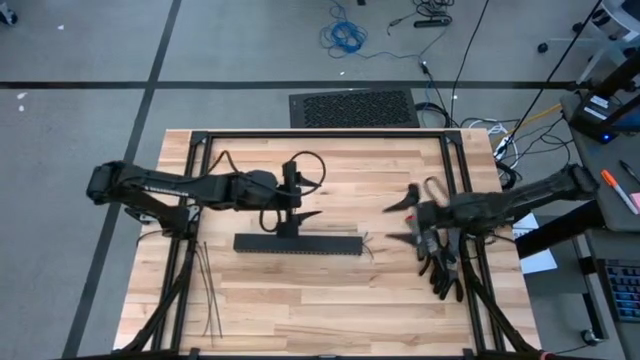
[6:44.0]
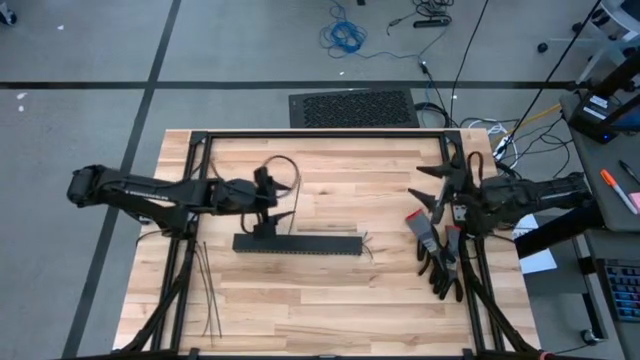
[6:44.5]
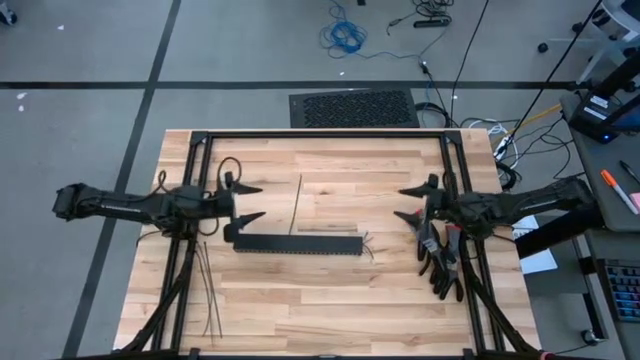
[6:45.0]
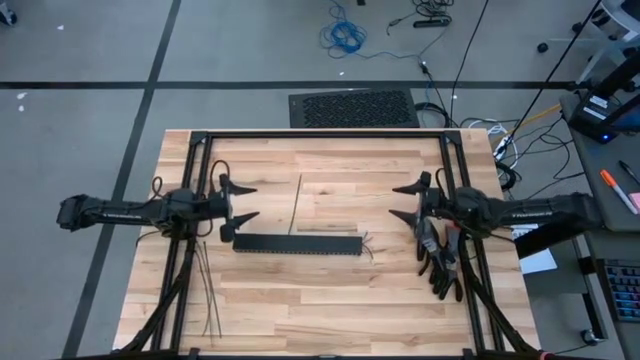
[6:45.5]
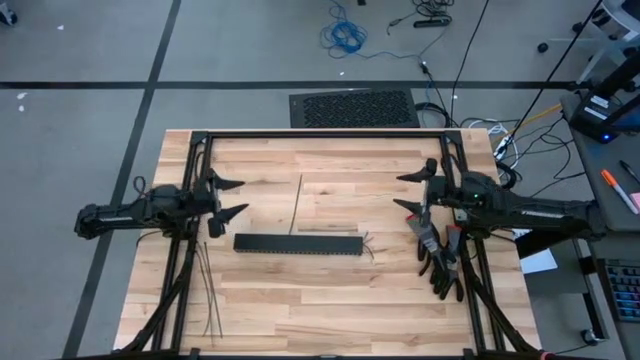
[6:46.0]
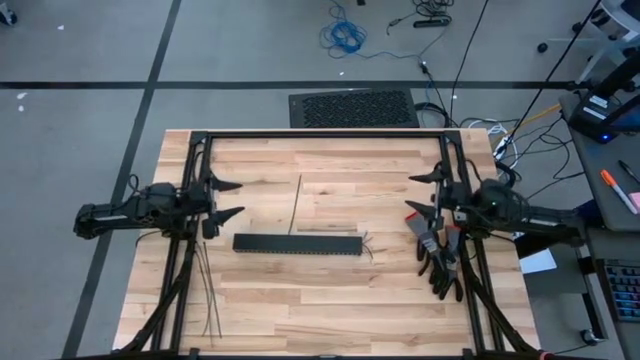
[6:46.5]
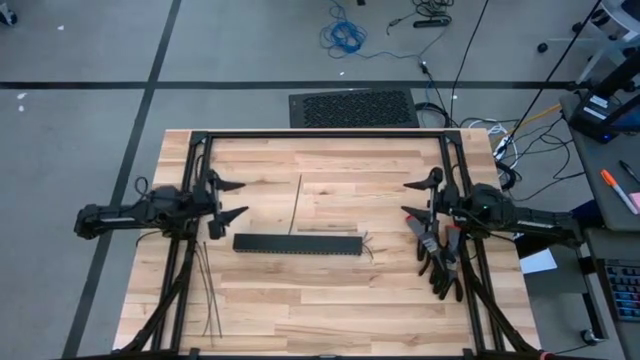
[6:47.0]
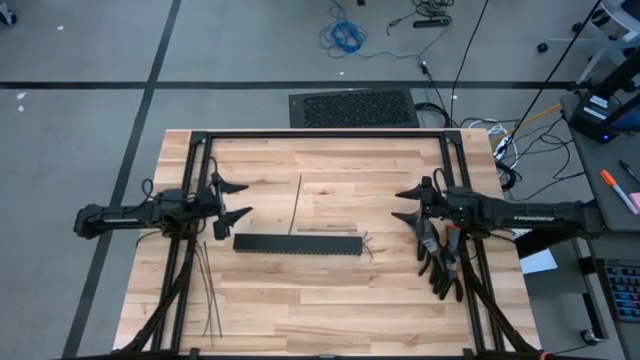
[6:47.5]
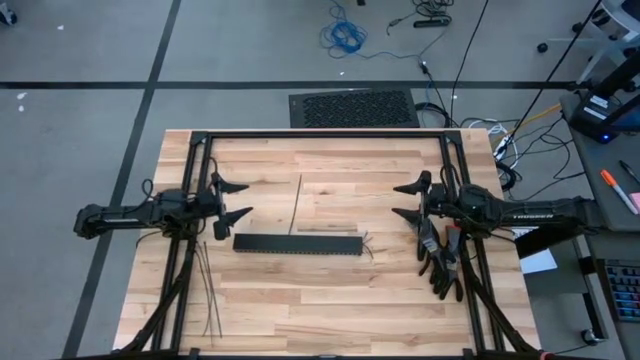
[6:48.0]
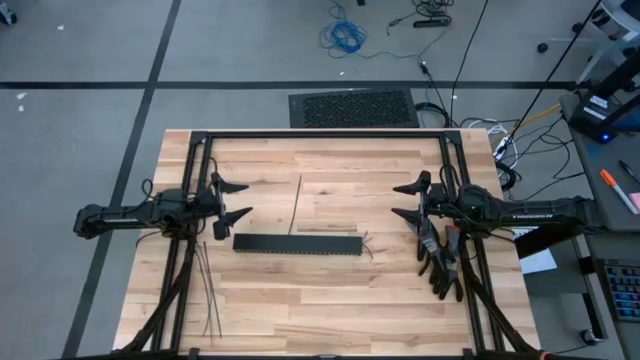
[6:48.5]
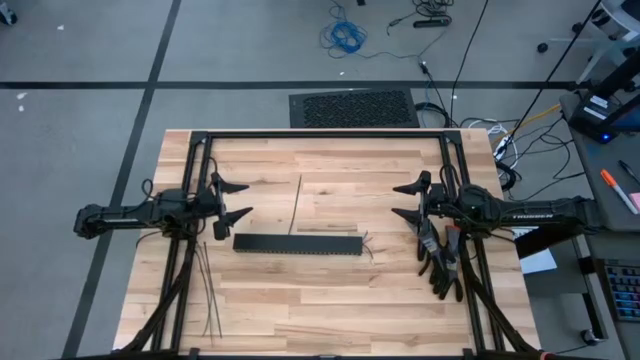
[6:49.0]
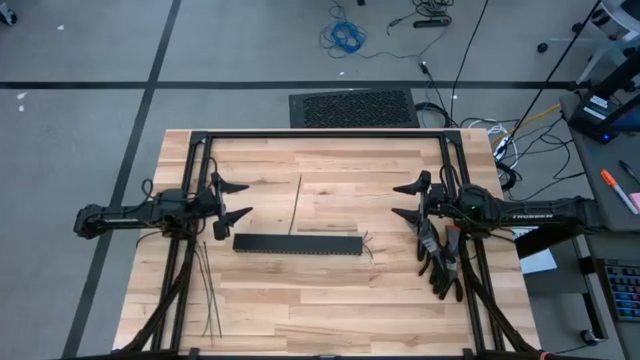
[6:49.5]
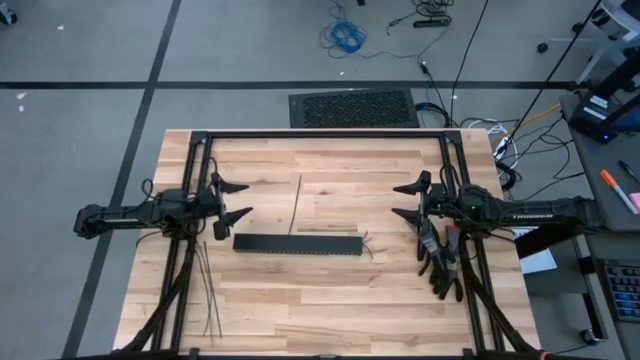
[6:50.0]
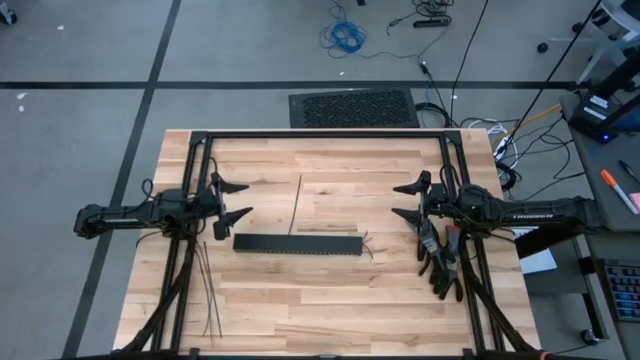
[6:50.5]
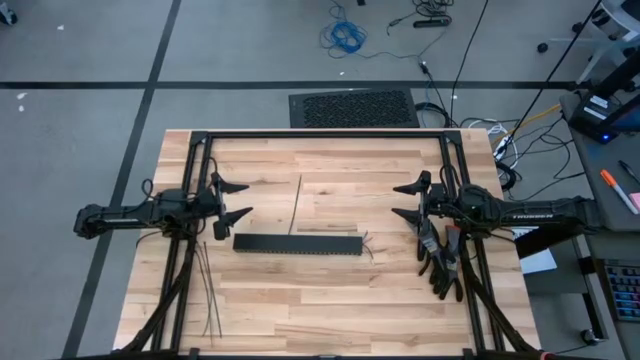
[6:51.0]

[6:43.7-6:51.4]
Task: Ziptie cables
Return to Home Position

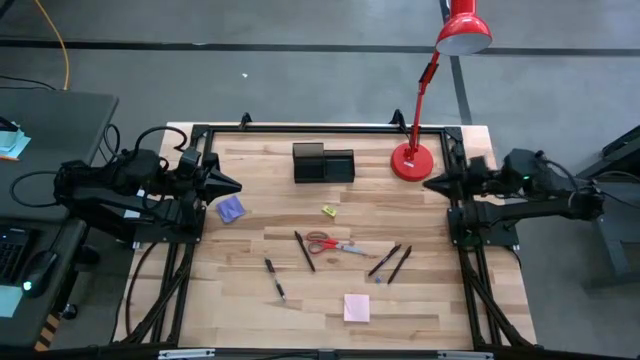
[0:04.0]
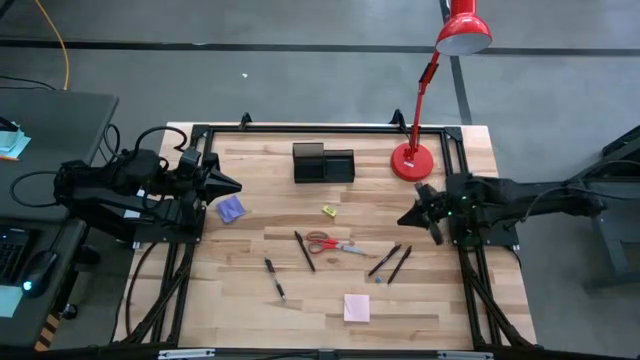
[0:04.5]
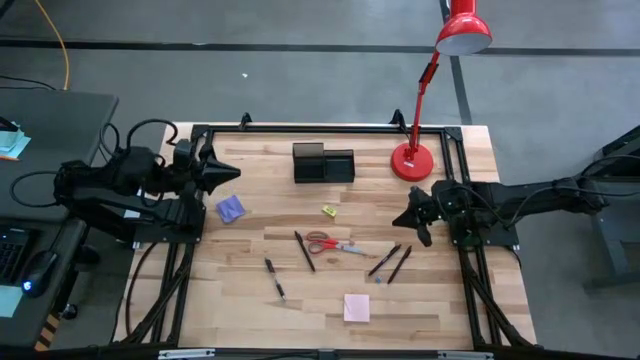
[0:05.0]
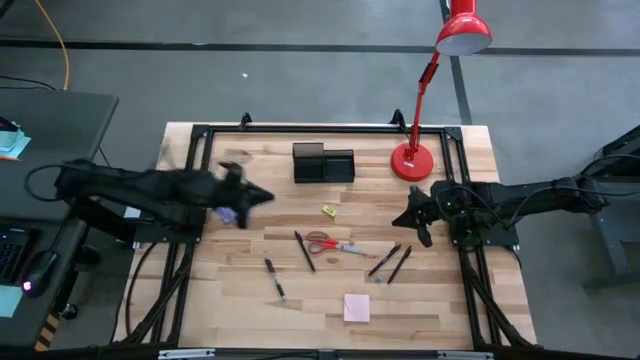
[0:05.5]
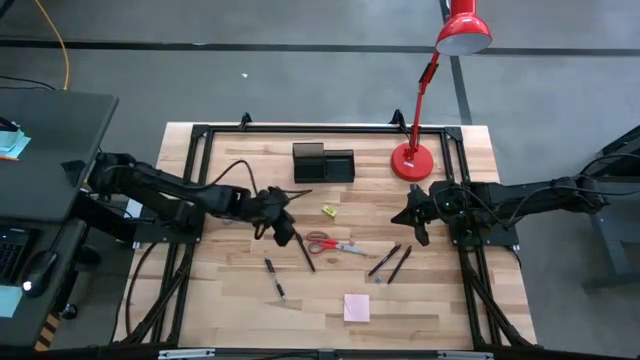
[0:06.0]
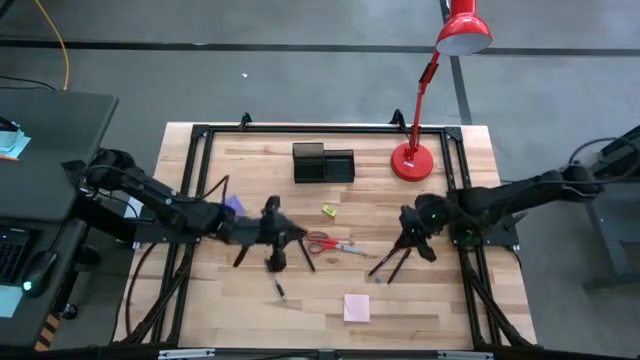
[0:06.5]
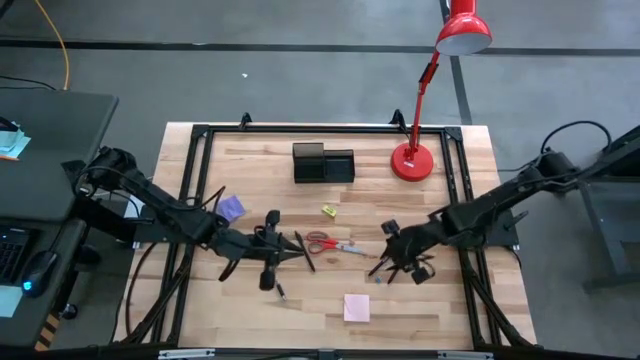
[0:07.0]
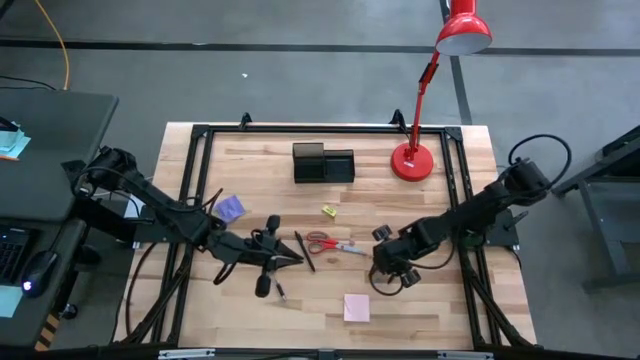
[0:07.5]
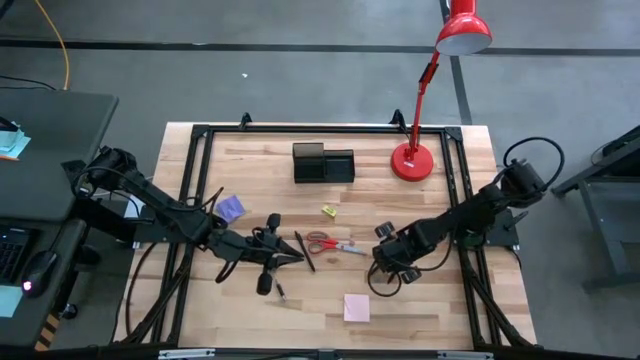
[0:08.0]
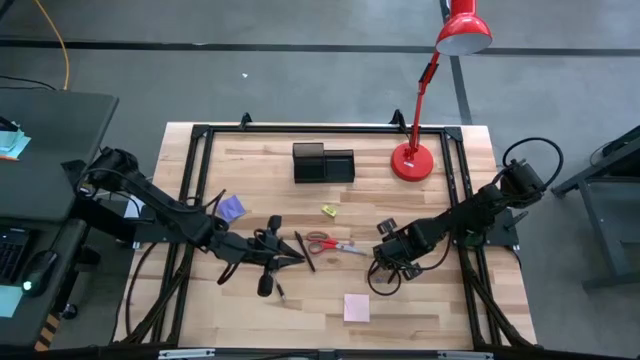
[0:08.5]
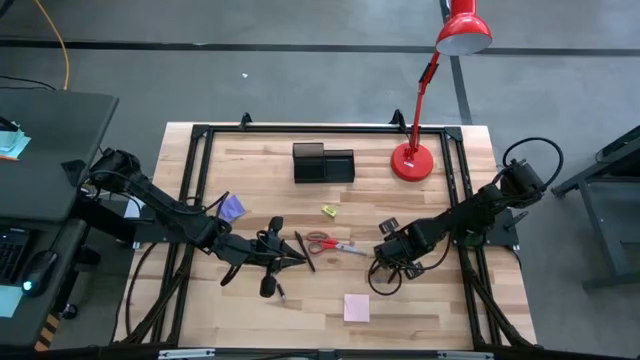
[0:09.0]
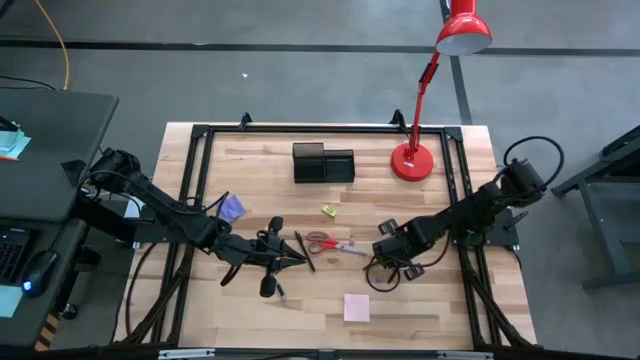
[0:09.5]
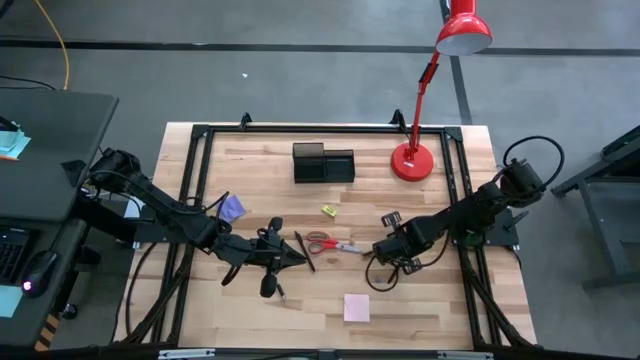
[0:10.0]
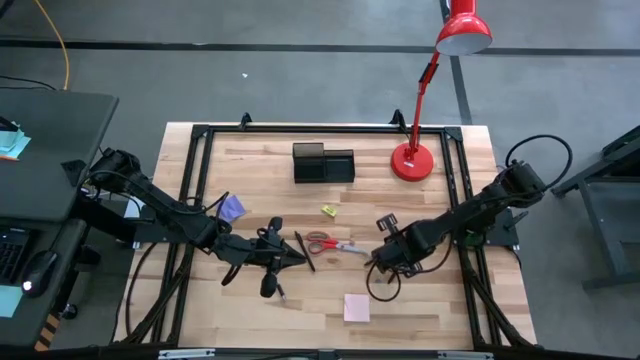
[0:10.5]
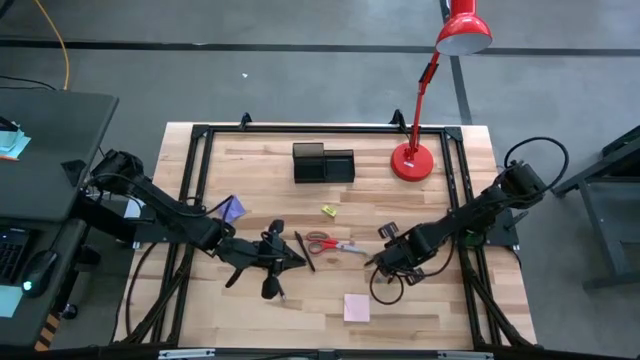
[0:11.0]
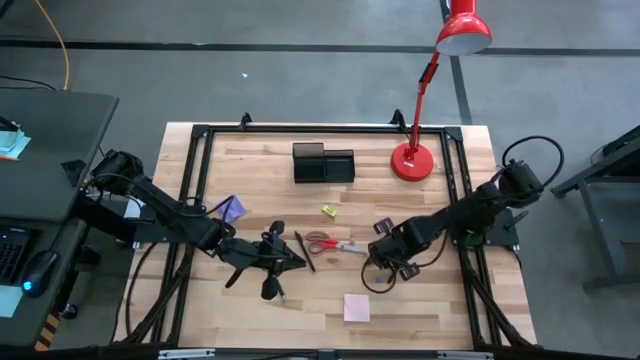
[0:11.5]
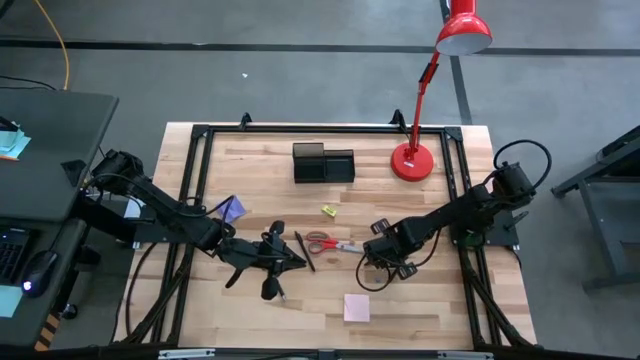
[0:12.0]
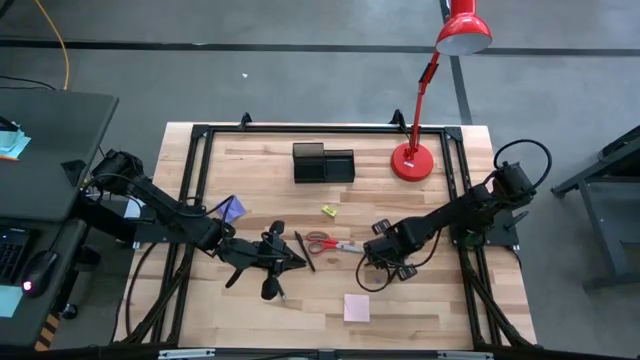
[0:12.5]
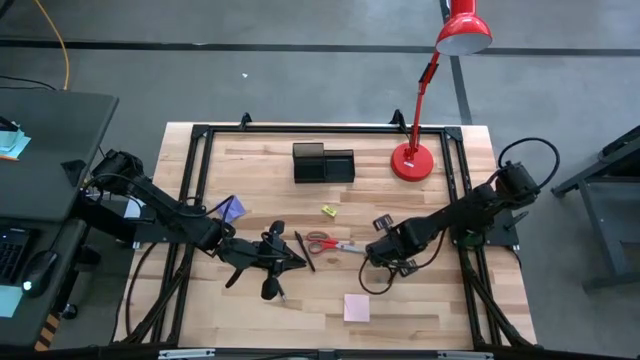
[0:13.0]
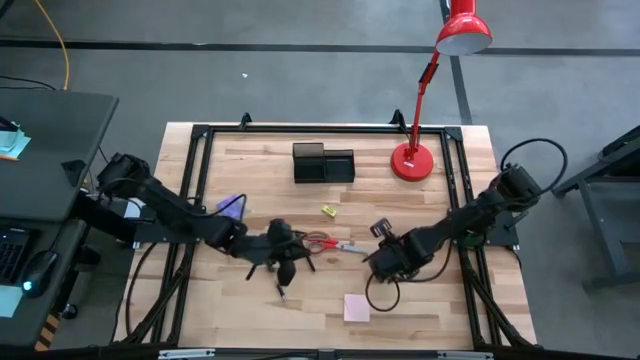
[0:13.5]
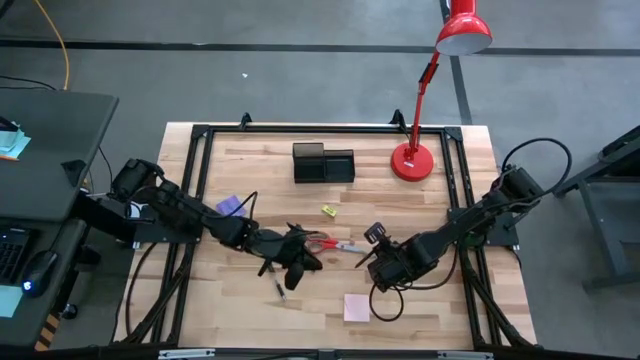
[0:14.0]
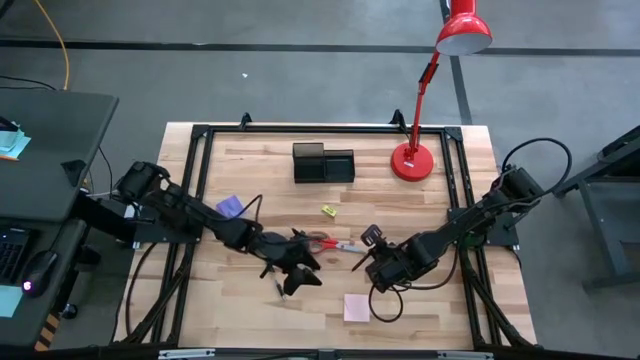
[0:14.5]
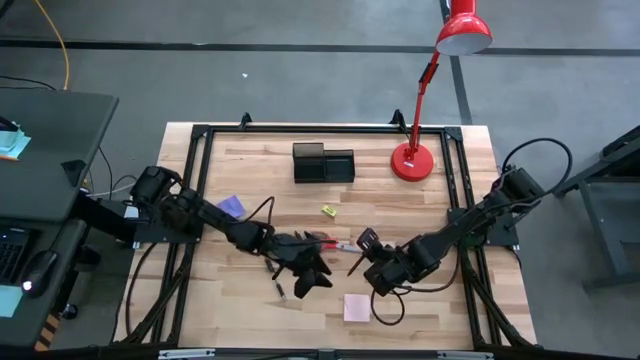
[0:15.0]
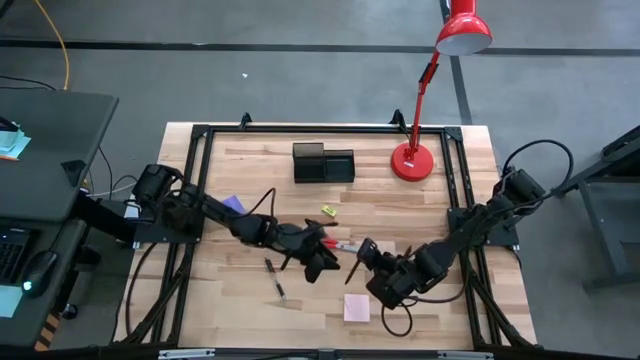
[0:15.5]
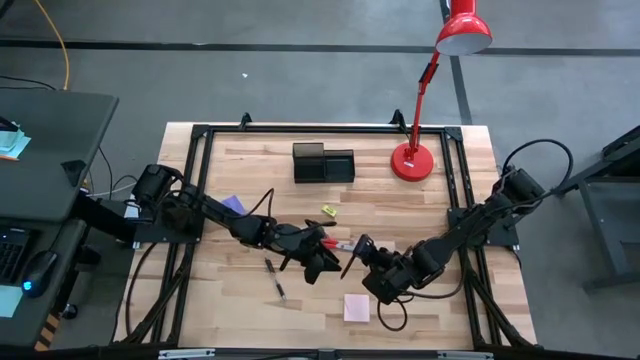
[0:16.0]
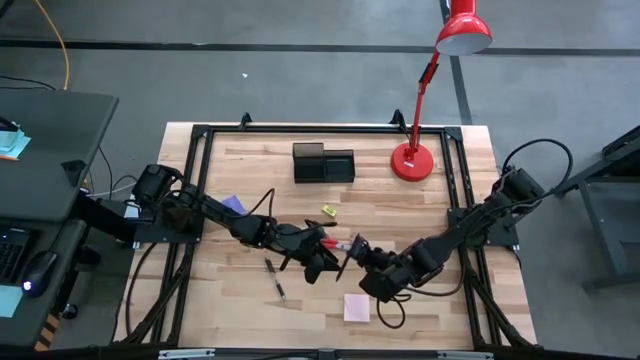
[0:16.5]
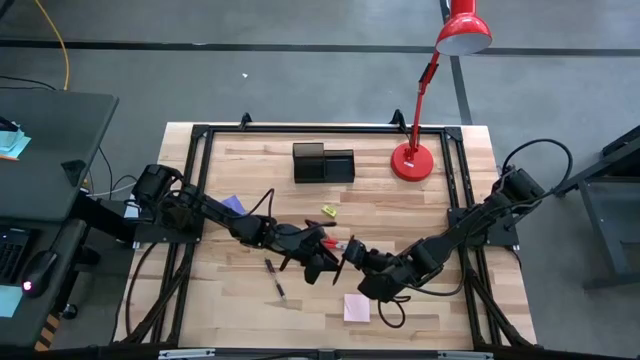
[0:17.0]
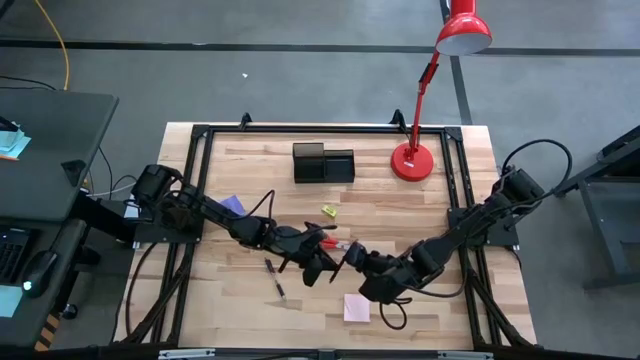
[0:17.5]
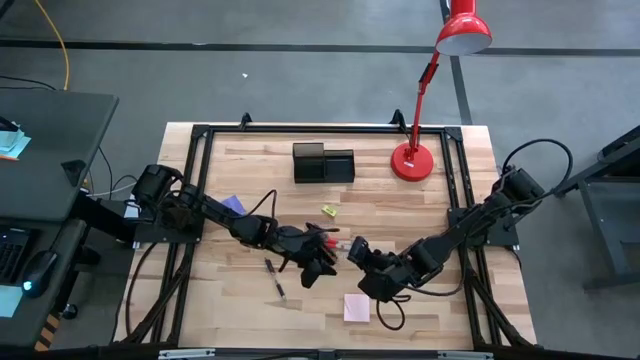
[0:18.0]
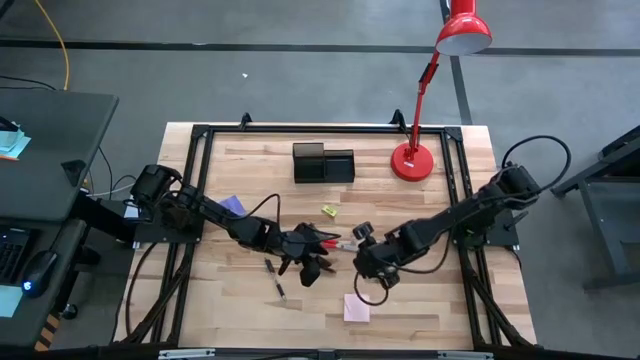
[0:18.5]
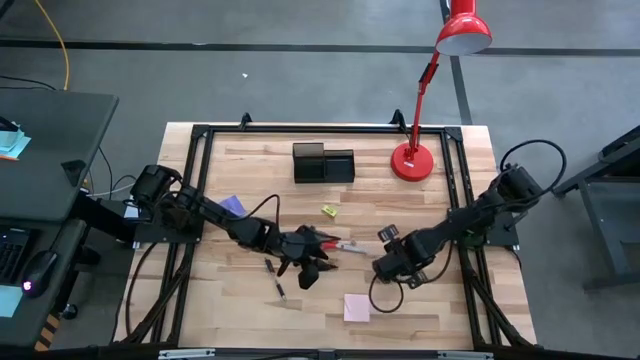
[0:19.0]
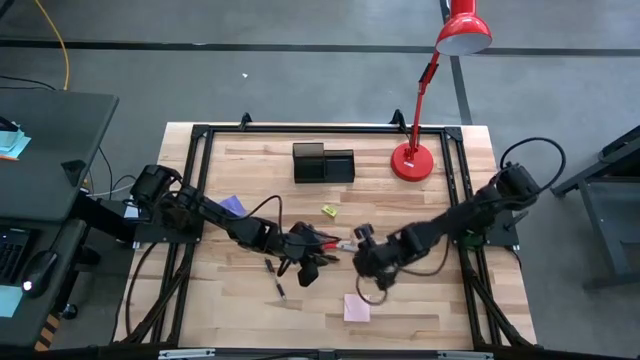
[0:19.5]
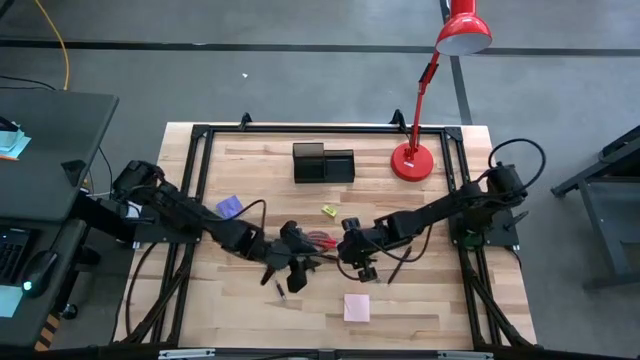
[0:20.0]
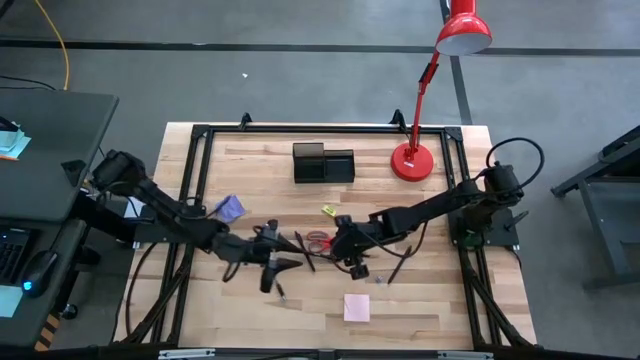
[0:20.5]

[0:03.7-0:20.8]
Task: Pick and place office supplies into organizer
Put the middle black pen into the desk organizer
